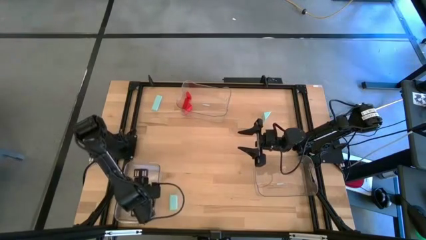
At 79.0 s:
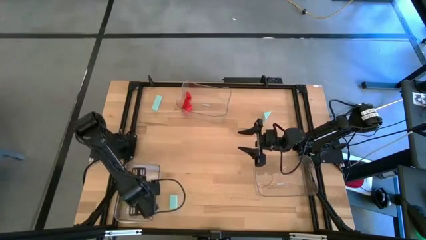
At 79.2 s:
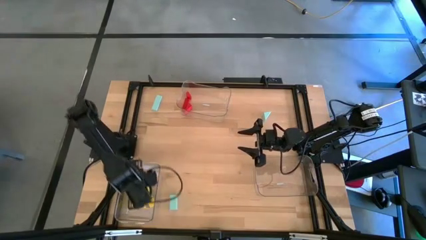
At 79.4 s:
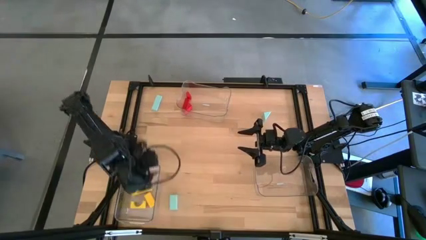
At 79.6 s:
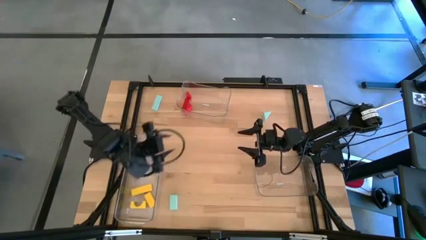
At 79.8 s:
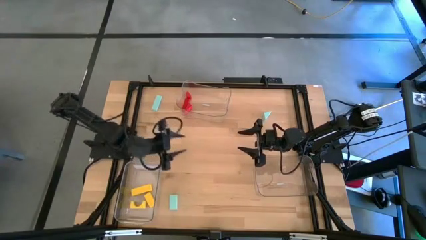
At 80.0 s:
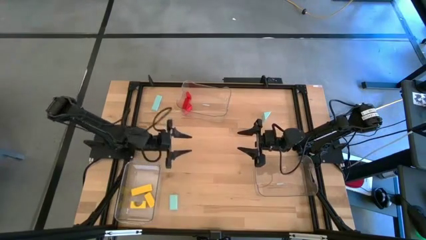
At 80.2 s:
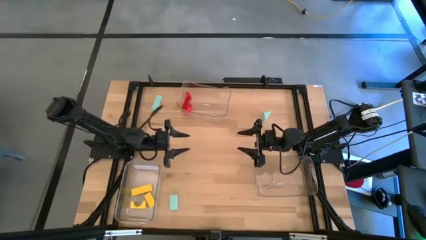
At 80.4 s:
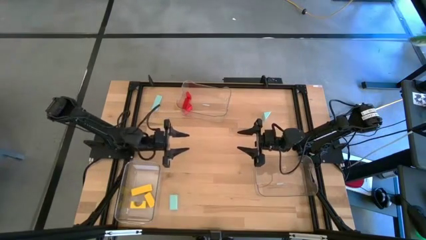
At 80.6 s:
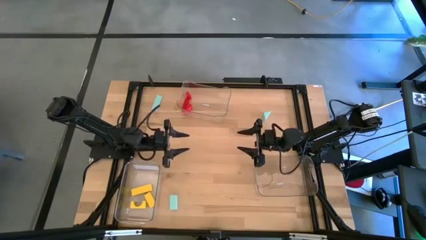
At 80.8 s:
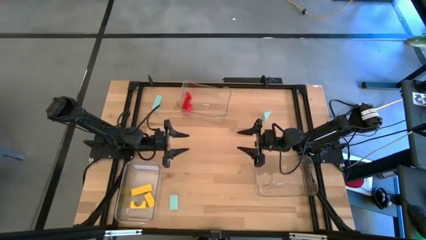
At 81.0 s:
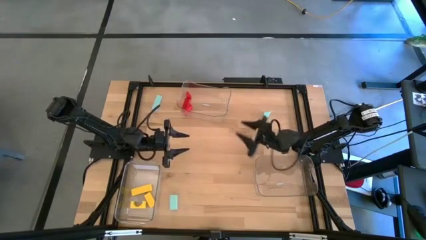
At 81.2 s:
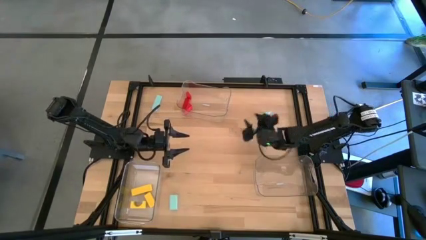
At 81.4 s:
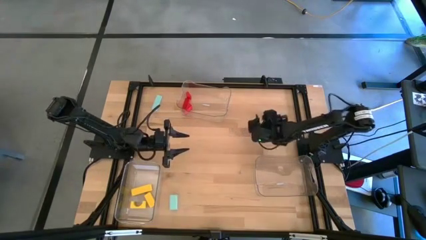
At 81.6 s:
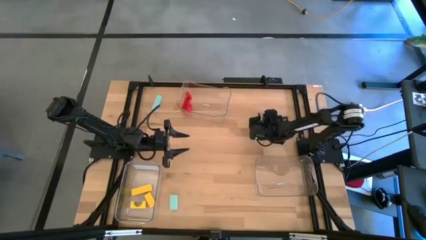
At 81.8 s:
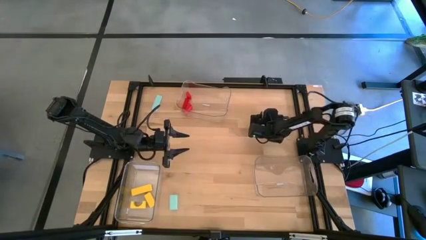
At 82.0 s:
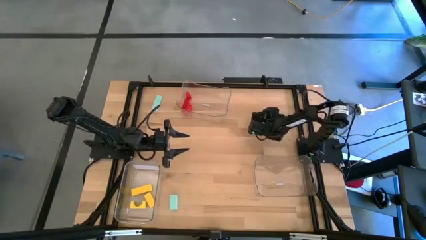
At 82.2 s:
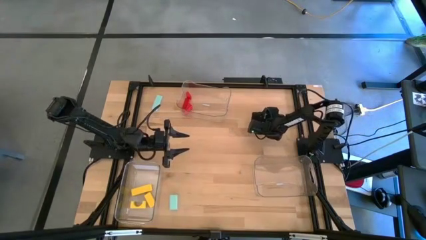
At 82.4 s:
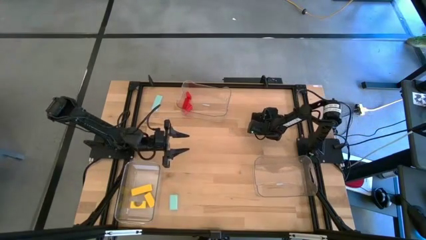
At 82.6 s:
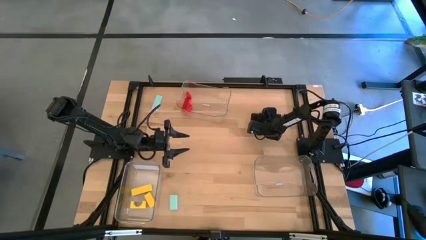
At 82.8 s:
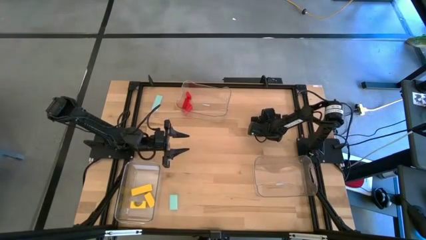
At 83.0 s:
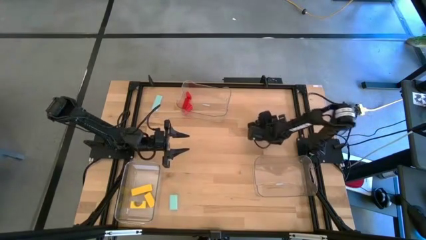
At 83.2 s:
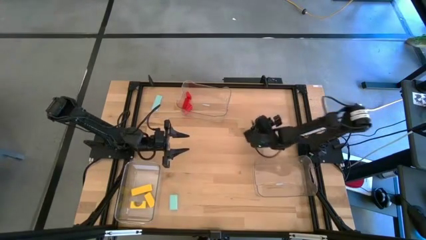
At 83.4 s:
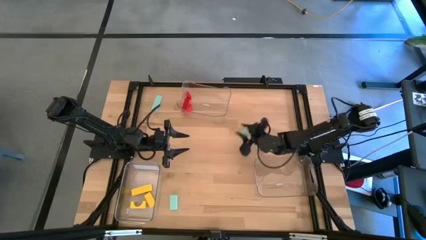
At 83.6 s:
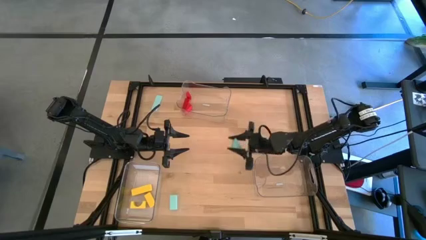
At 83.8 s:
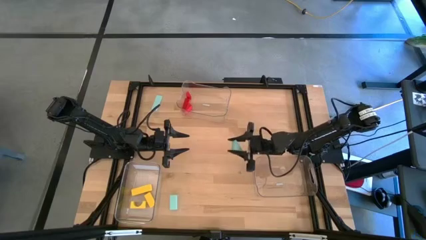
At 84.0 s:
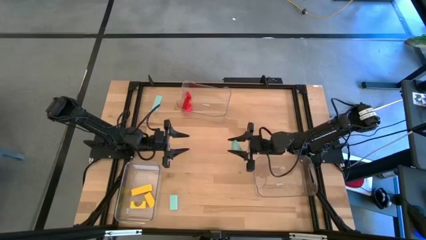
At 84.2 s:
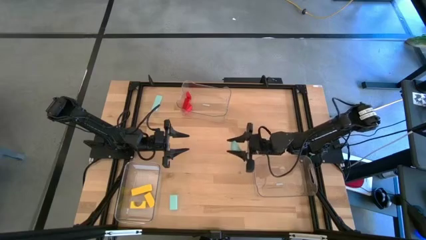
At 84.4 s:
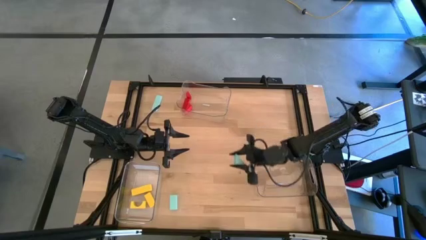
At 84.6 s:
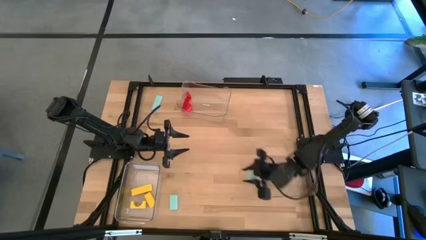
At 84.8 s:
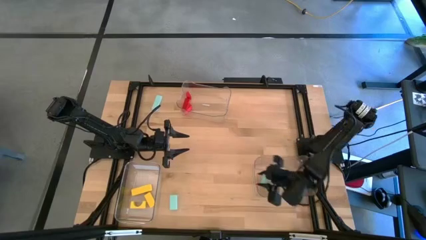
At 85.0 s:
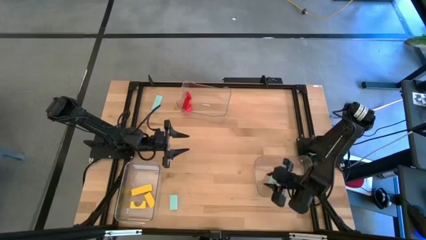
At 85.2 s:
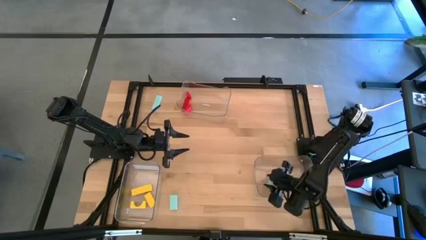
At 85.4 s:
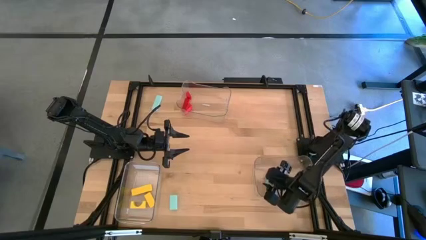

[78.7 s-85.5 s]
Task: Sort & place blocks by color
Put the top right blue block into the bottom right transparent bin

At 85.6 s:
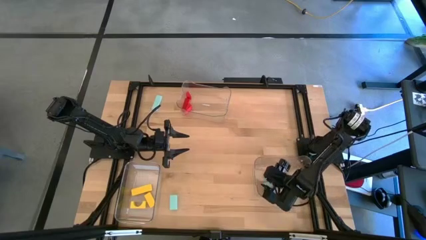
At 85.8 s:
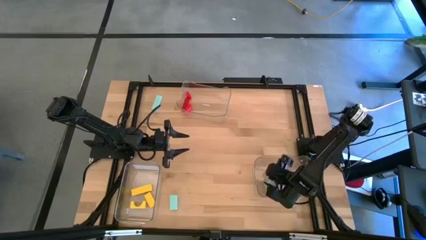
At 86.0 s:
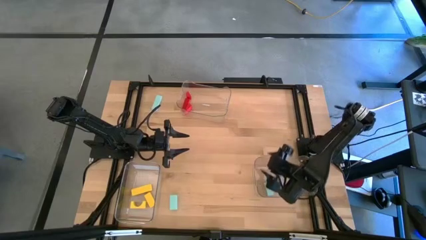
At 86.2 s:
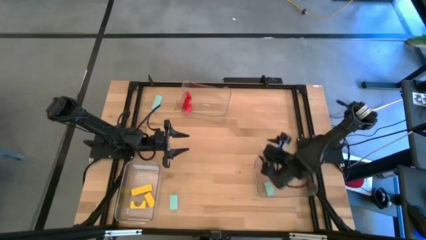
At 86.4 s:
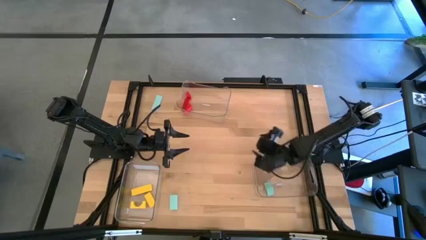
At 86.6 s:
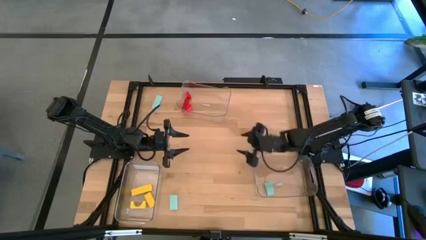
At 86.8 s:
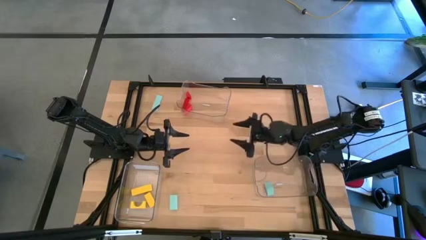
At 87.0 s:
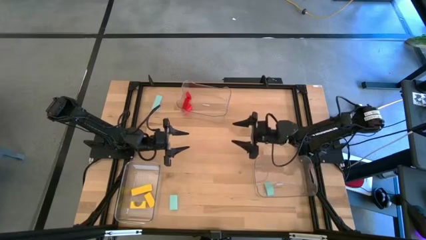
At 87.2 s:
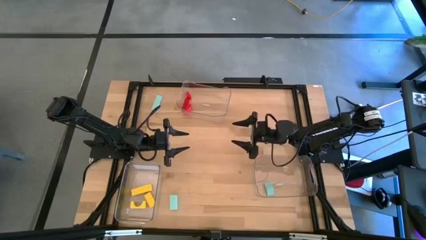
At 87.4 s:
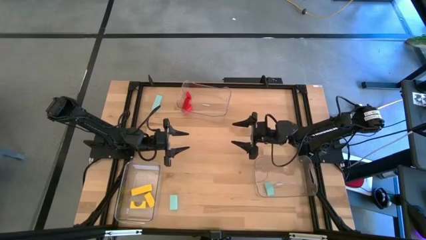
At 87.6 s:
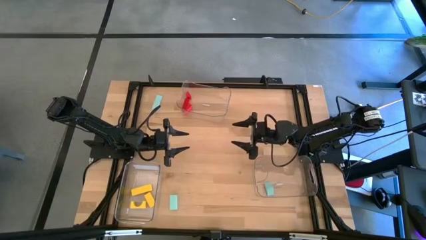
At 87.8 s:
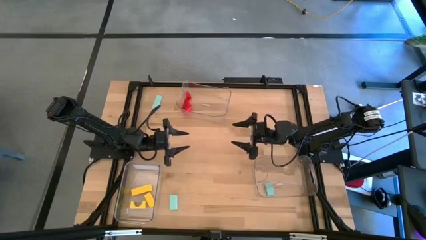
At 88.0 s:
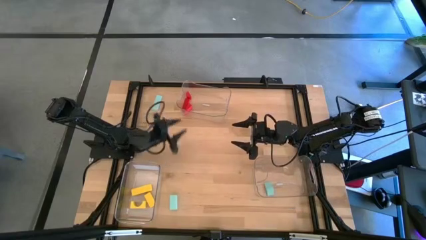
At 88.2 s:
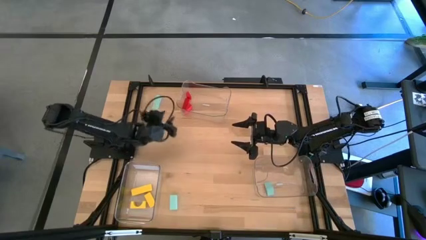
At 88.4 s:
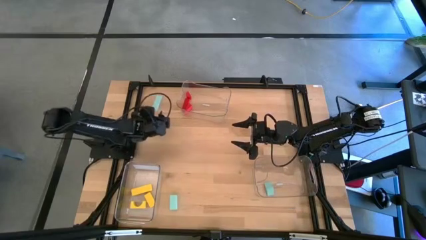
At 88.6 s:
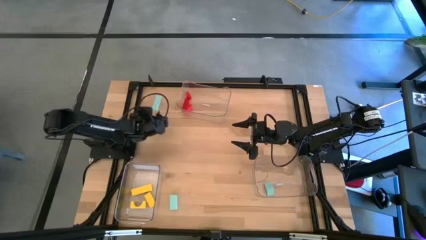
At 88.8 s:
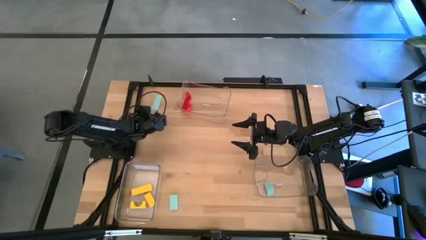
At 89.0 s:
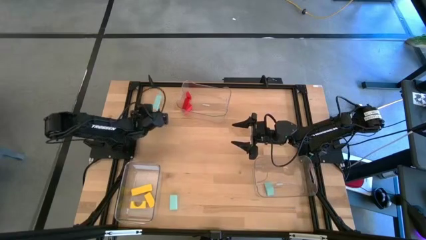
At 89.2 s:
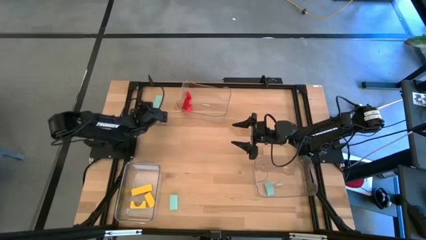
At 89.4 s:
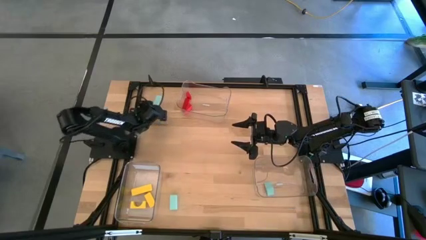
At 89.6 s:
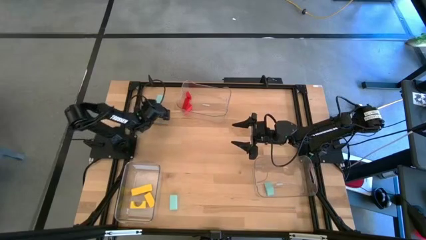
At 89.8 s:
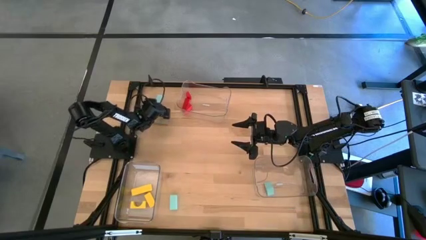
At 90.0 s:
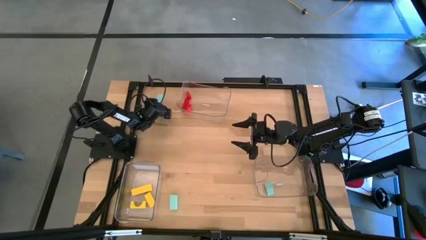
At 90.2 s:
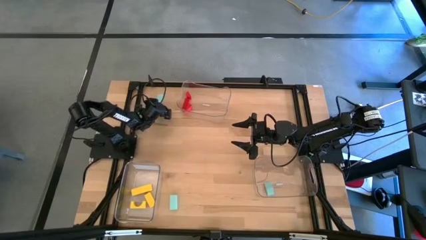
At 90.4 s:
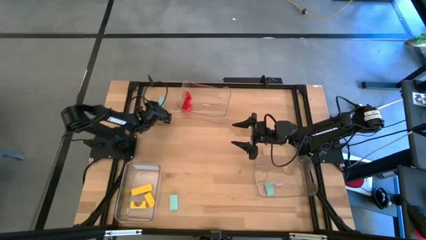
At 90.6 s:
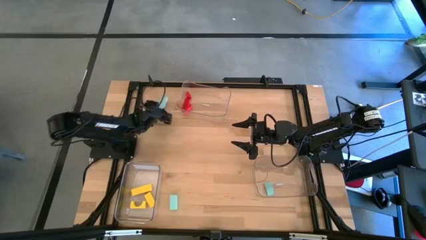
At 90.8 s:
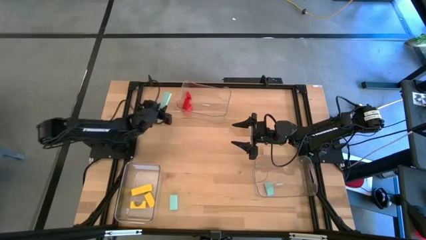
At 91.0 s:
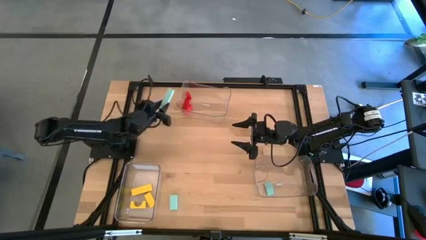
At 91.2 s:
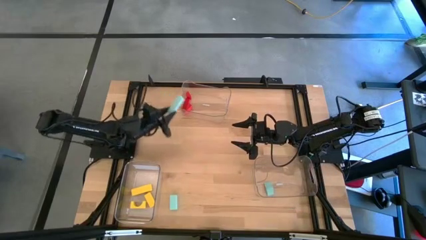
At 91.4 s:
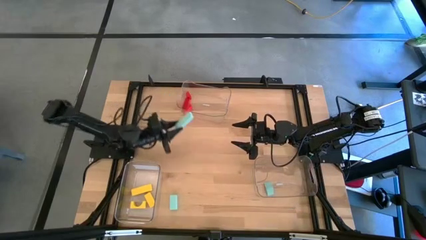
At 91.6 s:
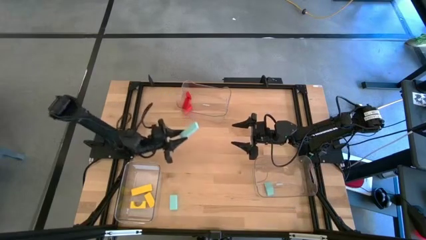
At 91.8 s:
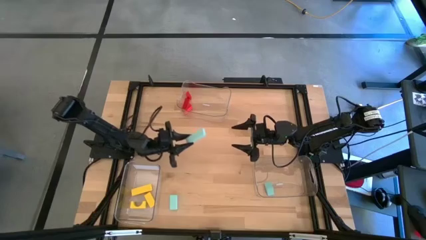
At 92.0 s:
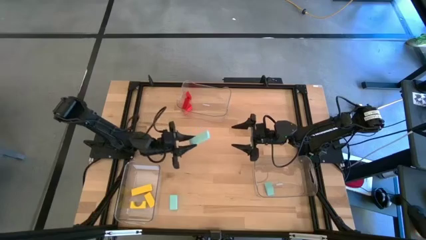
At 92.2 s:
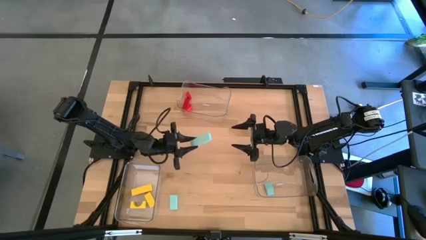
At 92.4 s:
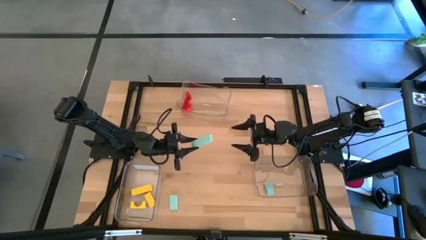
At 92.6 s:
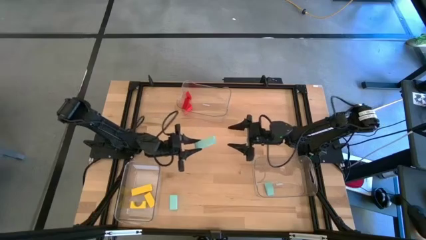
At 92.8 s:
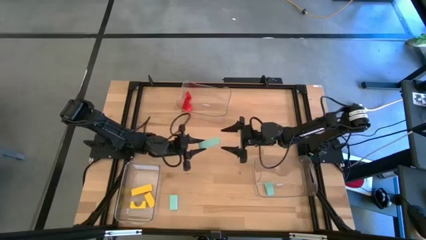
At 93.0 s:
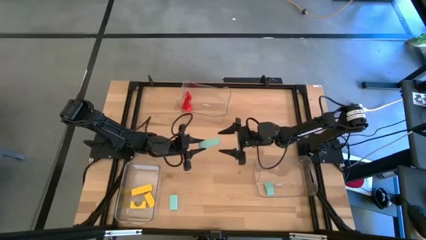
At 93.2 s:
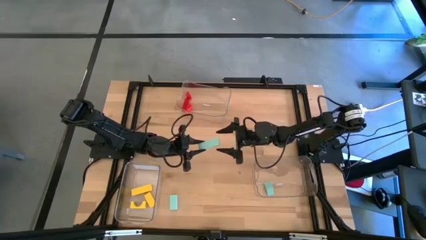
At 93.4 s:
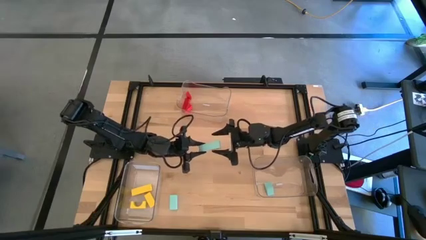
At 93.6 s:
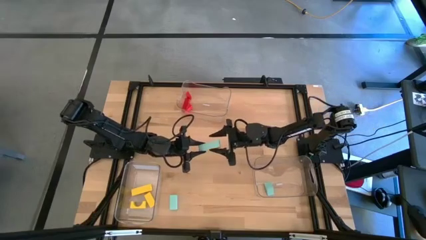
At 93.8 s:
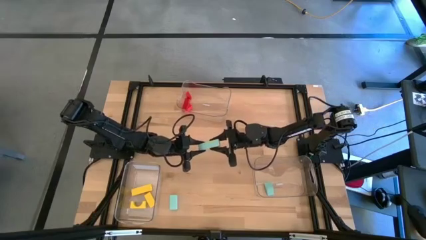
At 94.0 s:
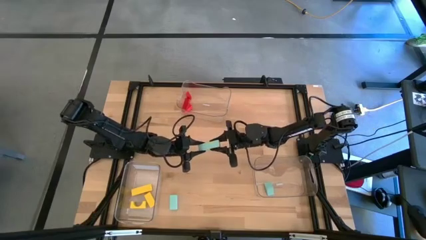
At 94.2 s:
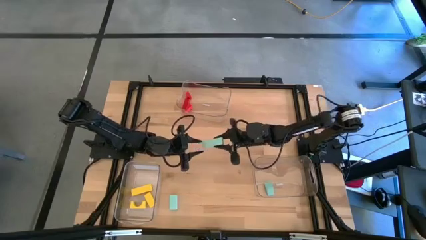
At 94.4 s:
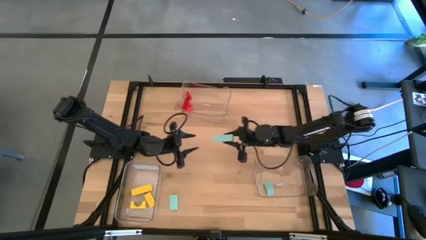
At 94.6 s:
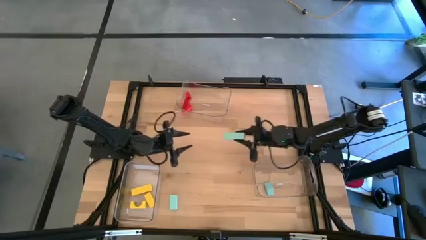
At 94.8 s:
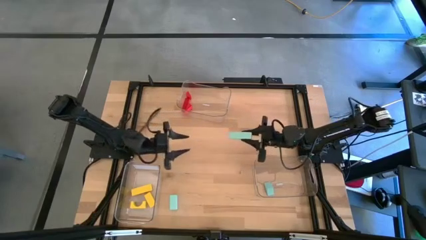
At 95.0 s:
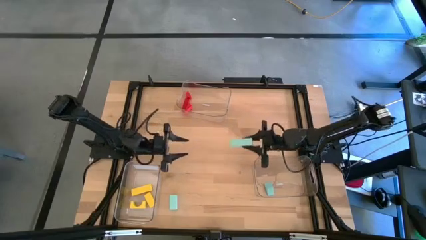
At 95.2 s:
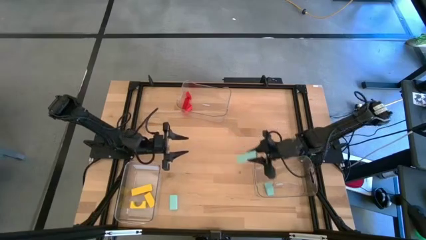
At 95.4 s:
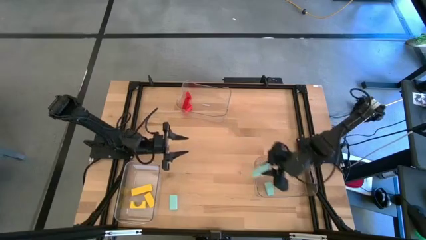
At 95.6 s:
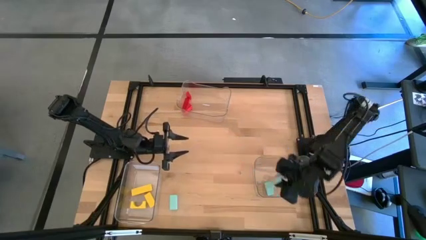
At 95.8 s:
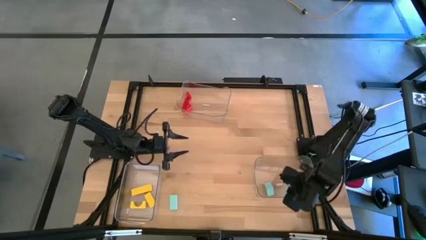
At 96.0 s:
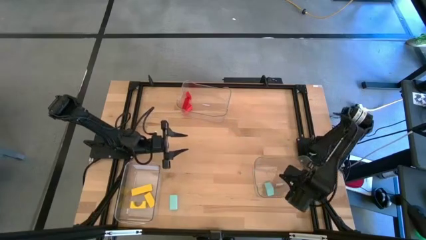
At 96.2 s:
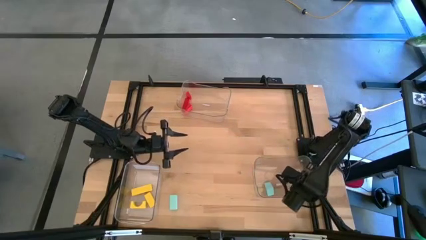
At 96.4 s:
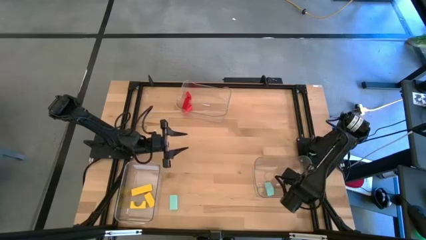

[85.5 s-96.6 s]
Put the top blue block into the bottom right transparent bin
